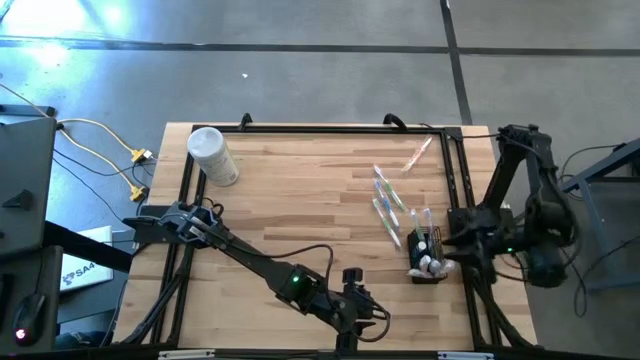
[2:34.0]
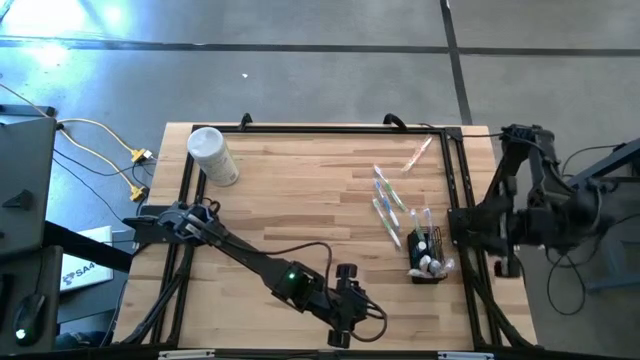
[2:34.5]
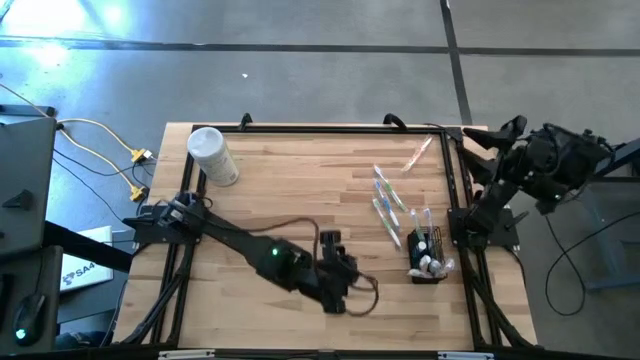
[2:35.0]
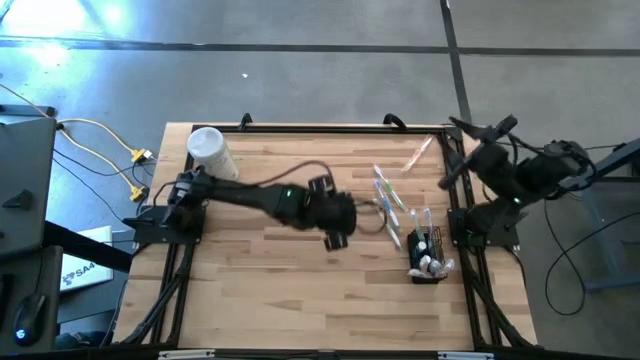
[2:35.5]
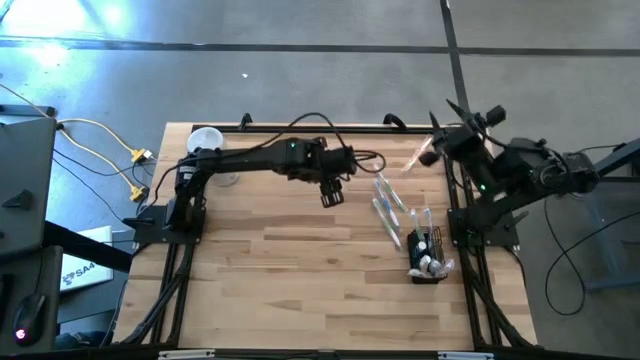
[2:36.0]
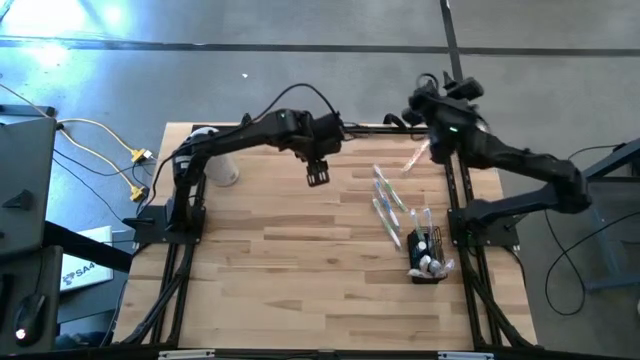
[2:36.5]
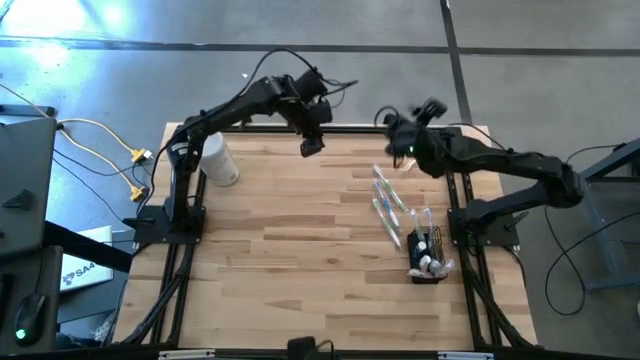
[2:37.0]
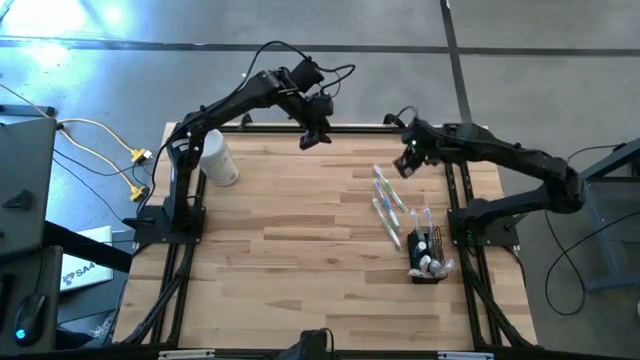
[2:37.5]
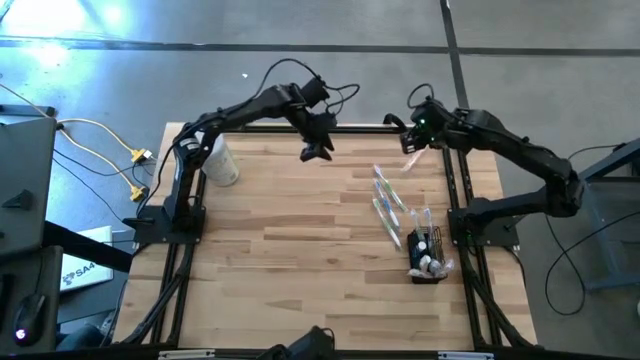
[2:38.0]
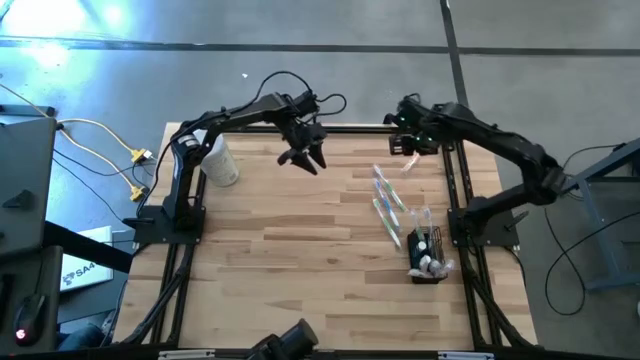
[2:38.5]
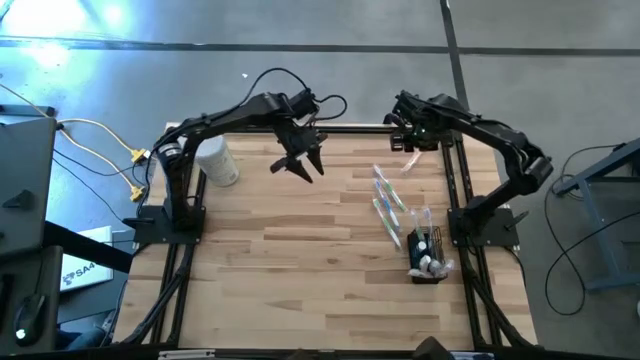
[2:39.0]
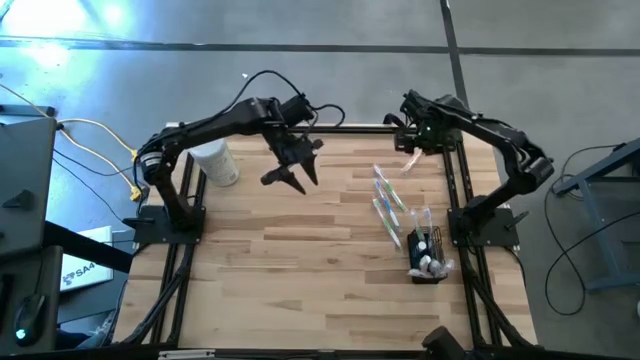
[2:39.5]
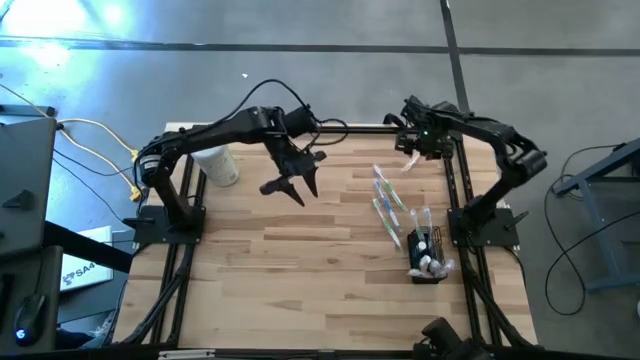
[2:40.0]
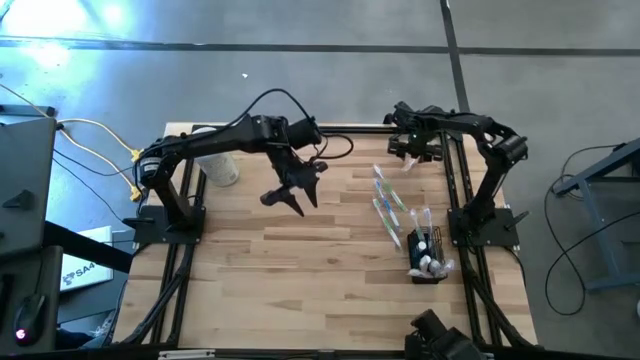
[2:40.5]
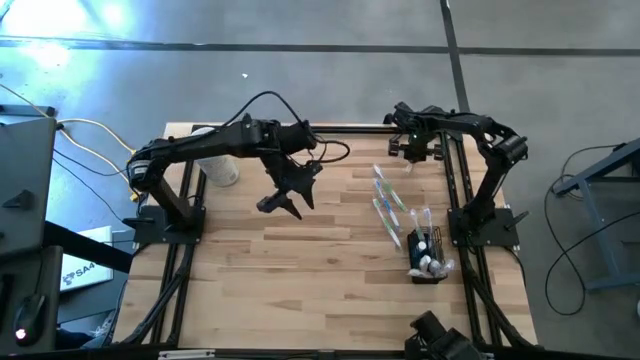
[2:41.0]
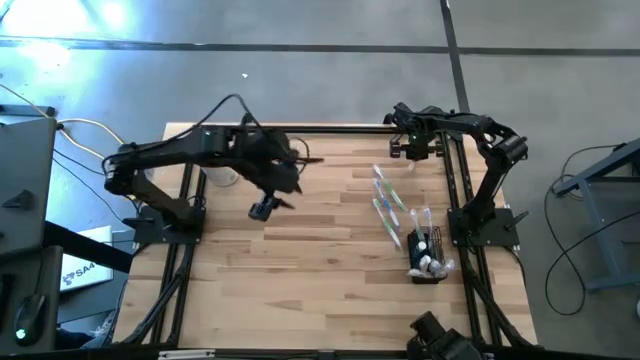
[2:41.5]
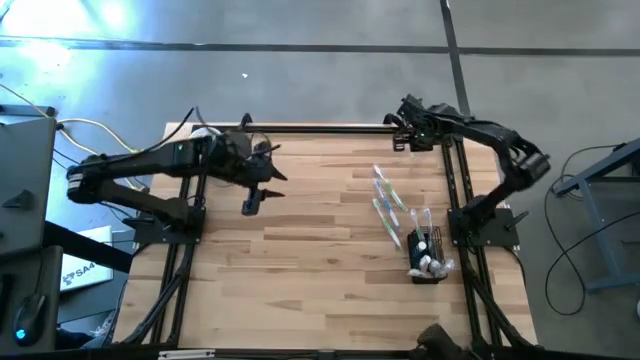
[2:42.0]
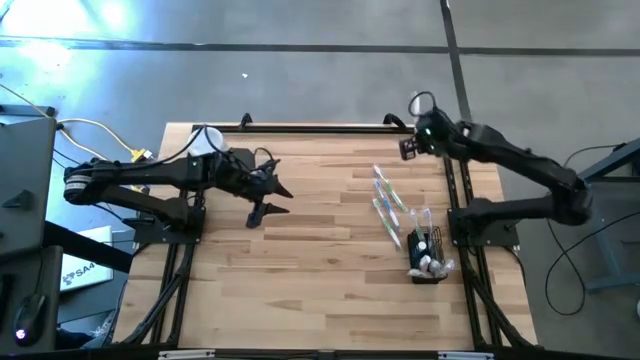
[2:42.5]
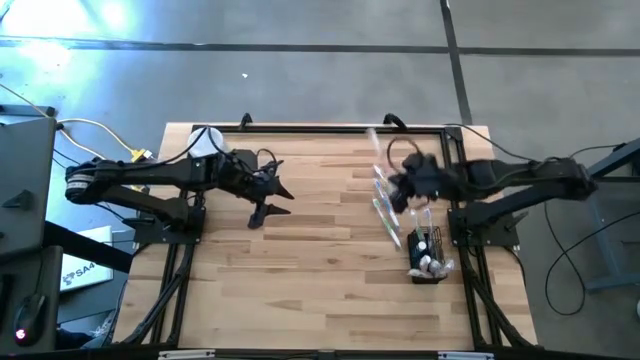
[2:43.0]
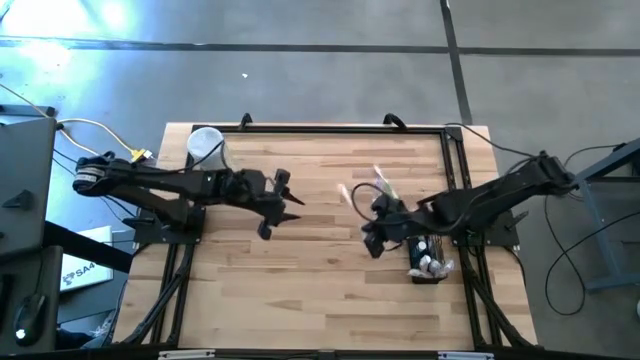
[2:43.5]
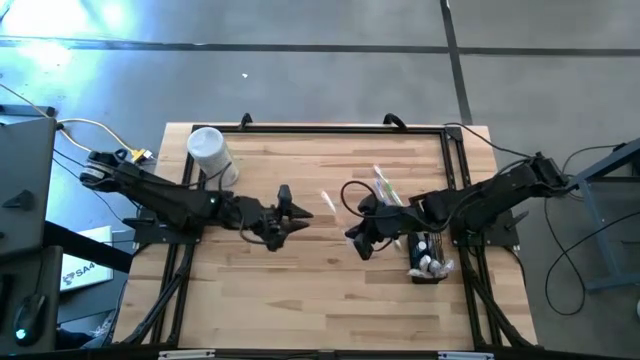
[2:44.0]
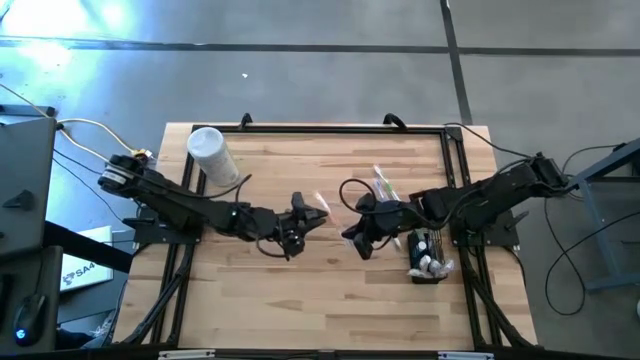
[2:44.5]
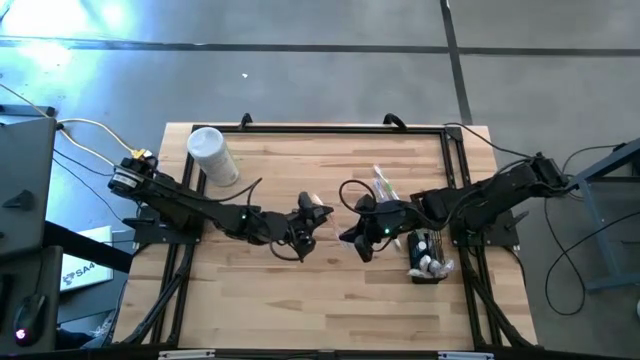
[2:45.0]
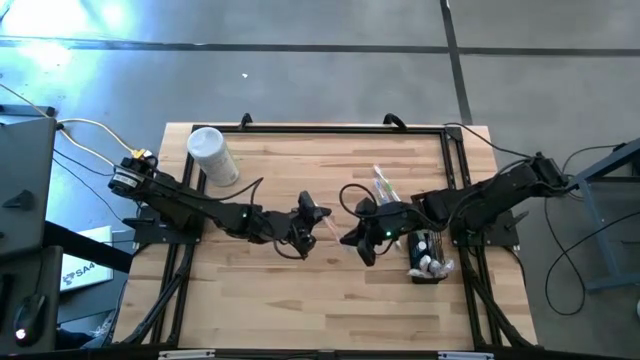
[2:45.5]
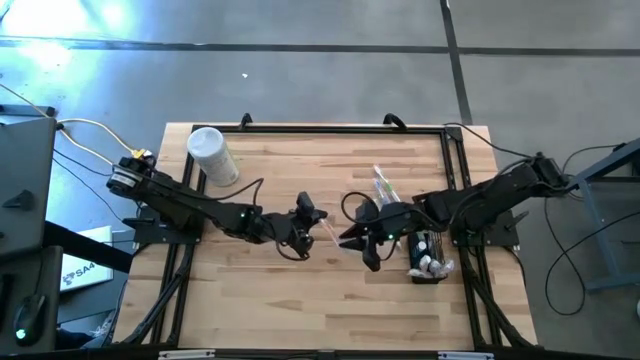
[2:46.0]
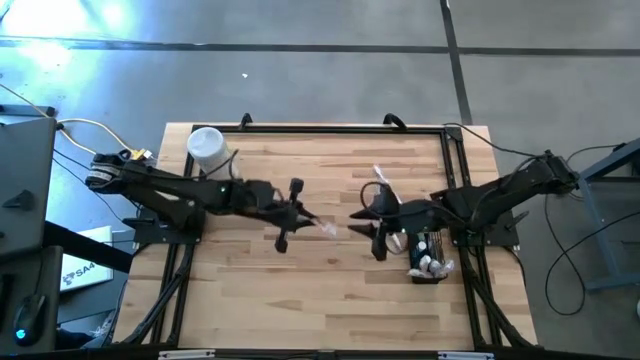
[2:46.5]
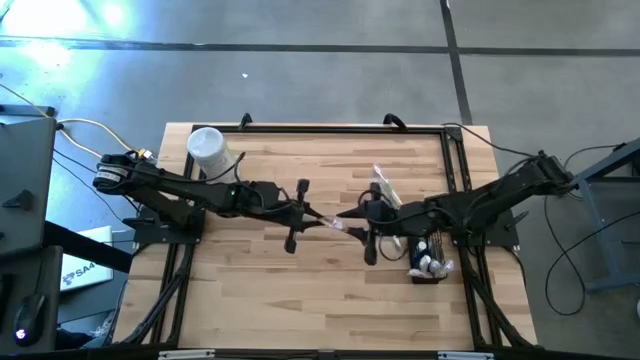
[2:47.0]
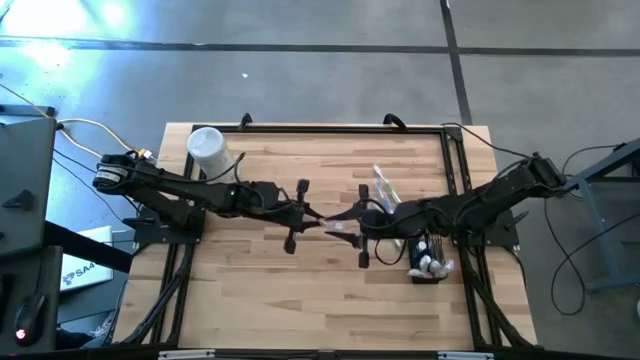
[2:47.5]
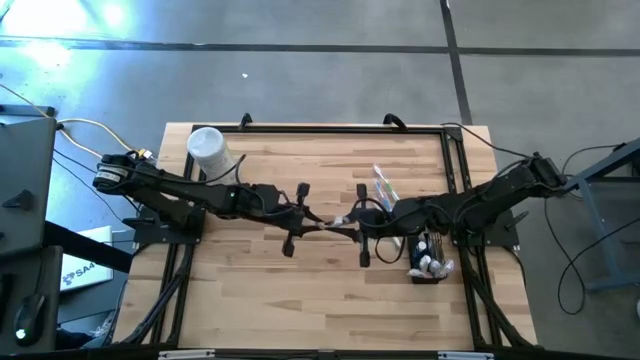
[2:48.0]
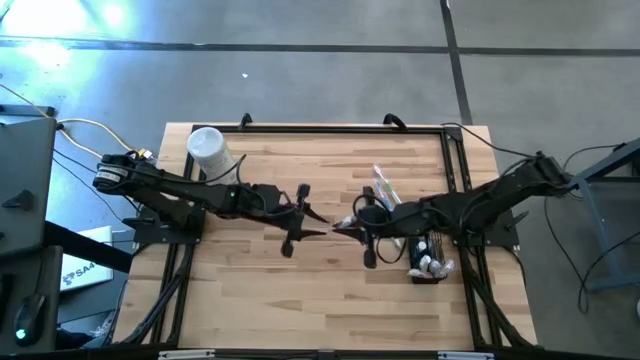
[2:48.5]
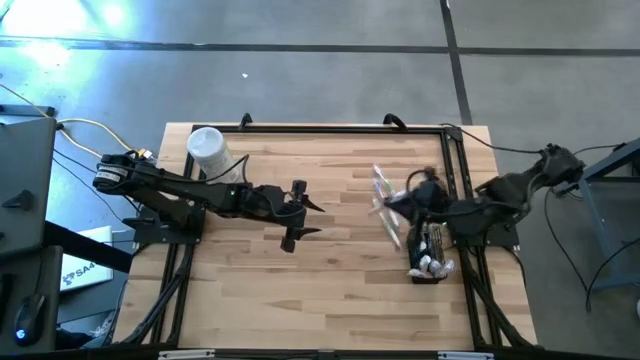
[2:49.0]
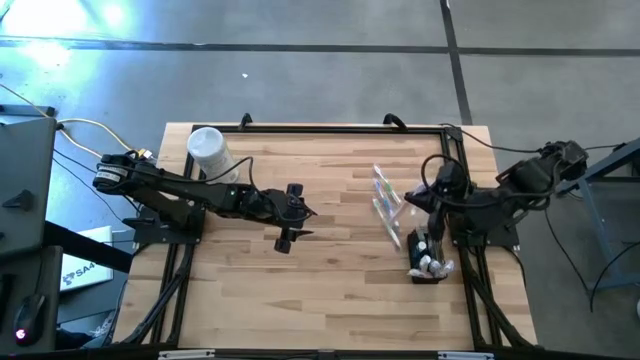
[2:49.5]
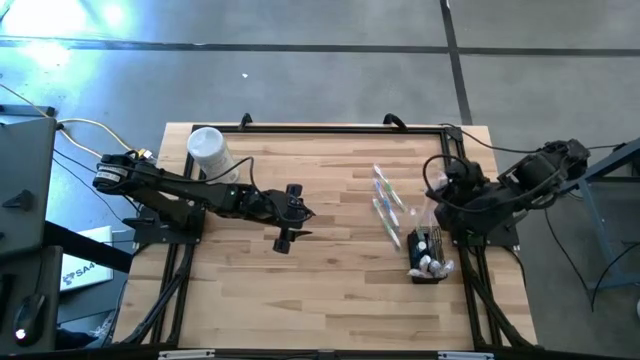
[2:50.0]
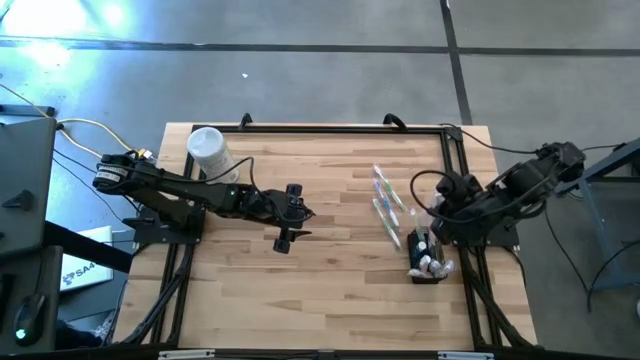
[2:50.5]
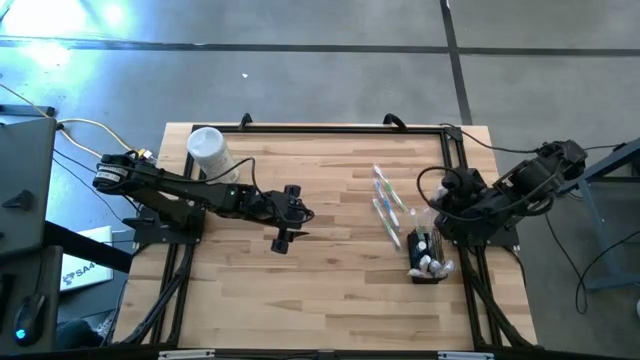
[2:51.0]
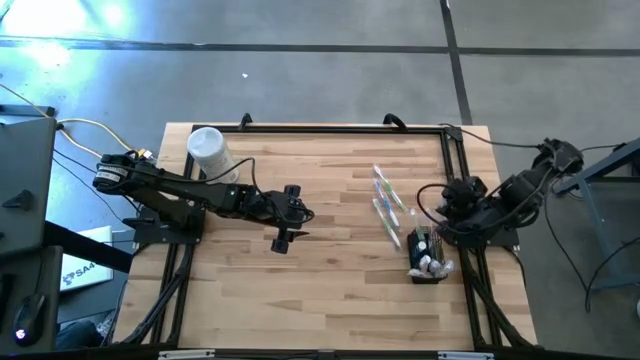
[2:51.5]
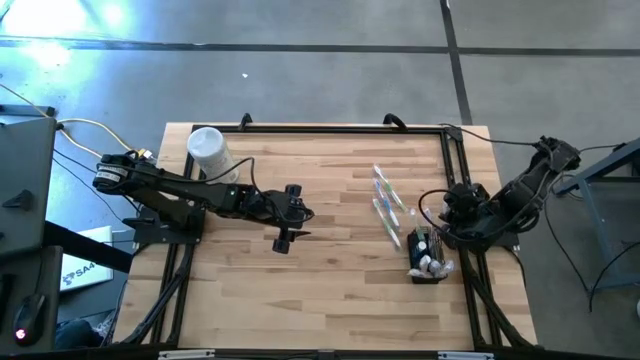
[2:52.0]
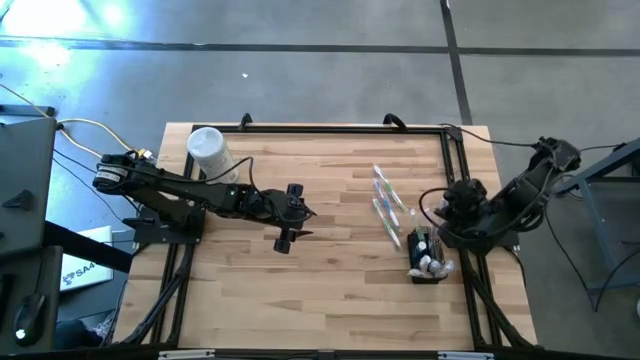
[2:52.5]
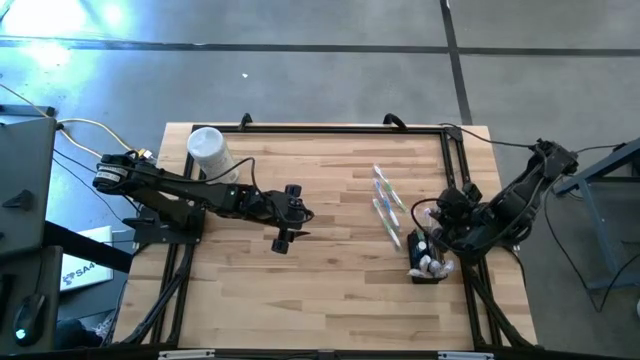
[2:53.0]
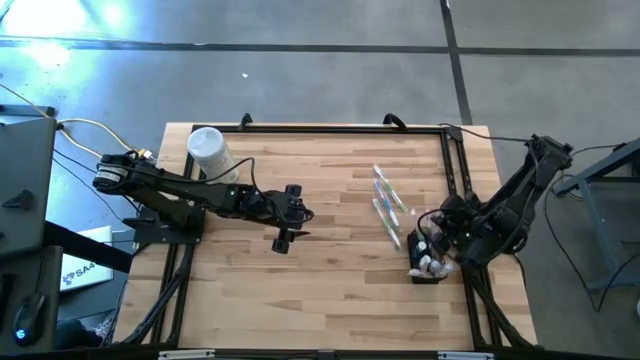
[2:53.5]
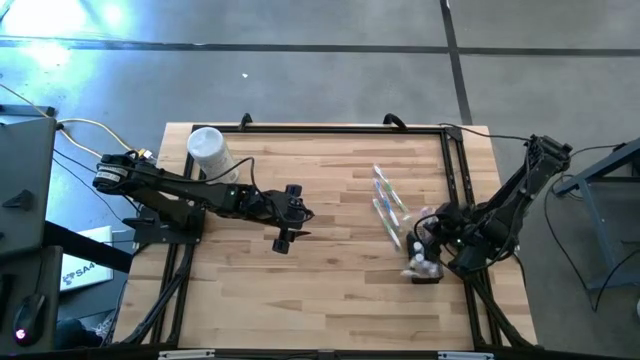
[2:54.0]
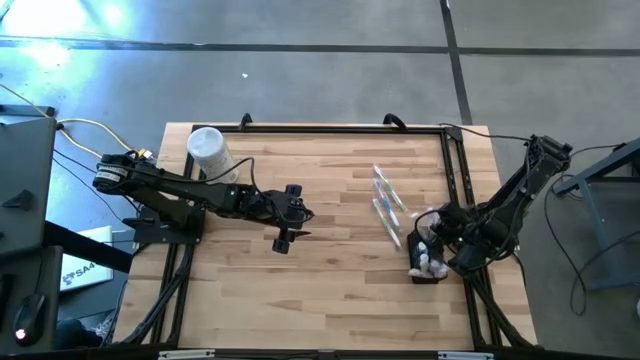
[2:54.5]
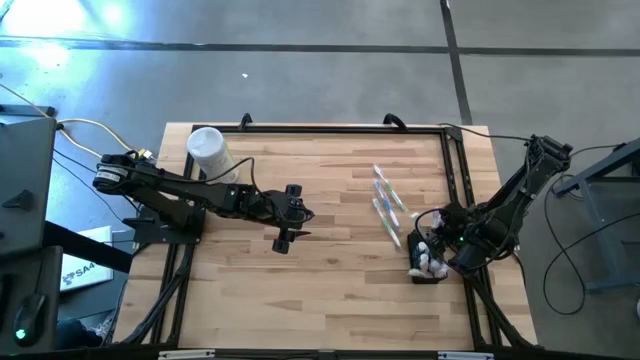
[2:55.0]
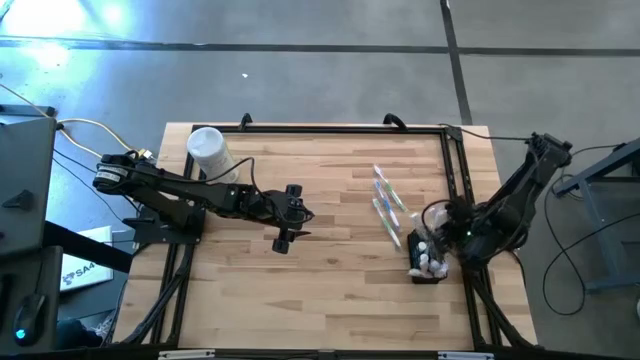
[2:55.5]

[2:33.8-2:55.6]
Task: Pick & Place toothbrushing station
Put the orange toothbrush into the black mesh organizer
